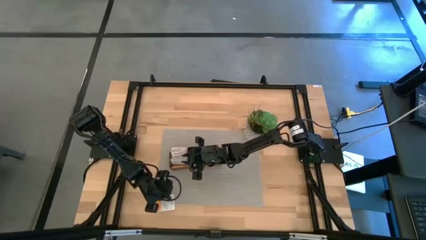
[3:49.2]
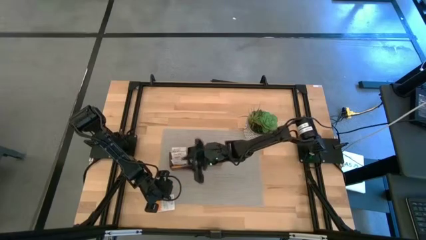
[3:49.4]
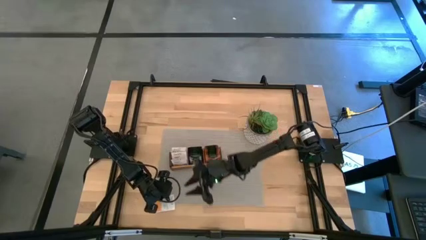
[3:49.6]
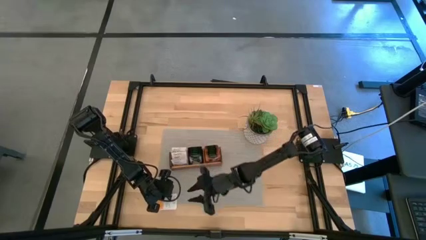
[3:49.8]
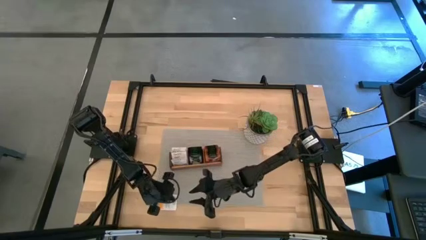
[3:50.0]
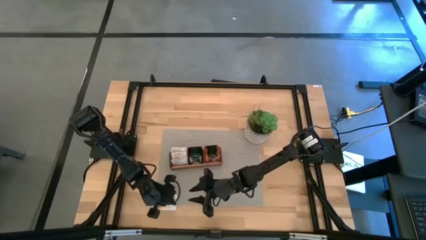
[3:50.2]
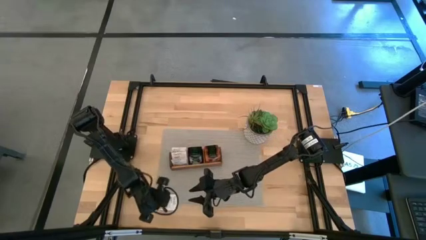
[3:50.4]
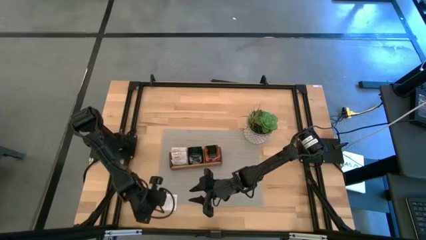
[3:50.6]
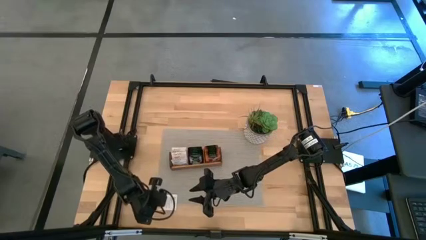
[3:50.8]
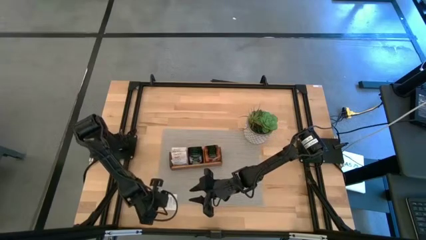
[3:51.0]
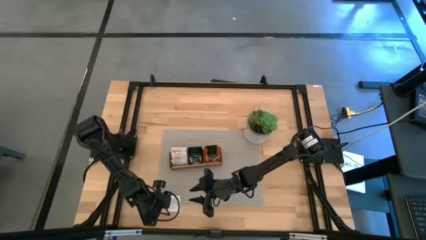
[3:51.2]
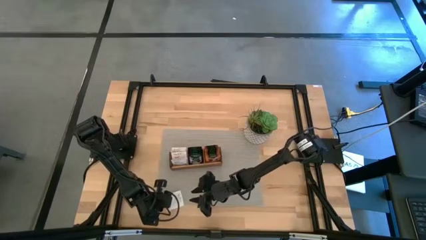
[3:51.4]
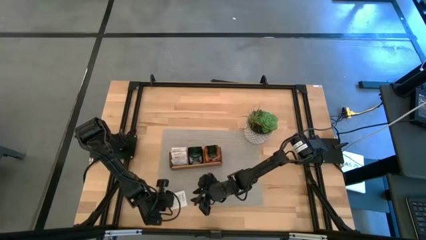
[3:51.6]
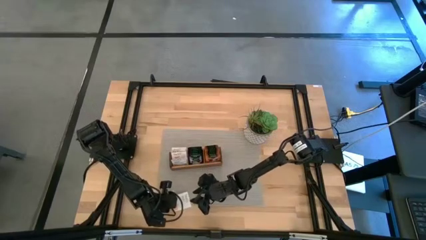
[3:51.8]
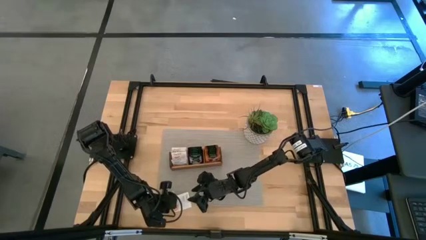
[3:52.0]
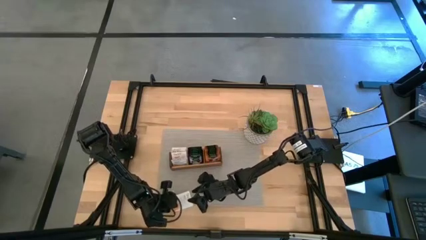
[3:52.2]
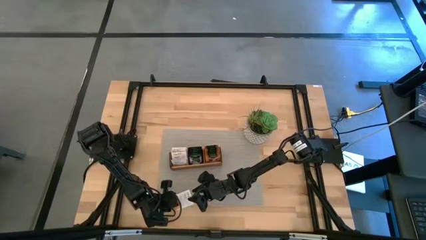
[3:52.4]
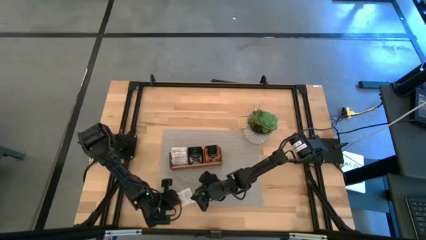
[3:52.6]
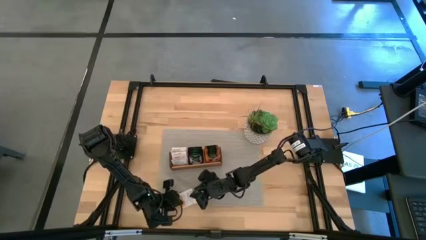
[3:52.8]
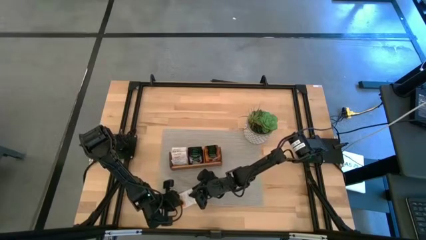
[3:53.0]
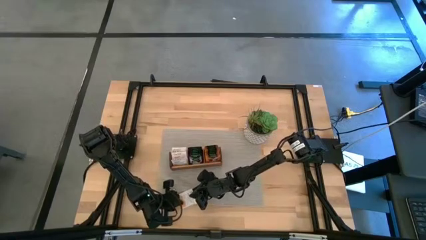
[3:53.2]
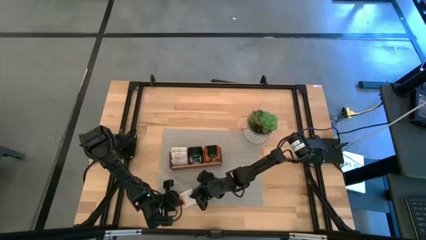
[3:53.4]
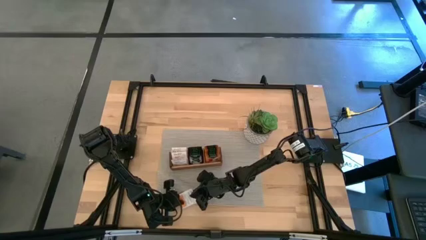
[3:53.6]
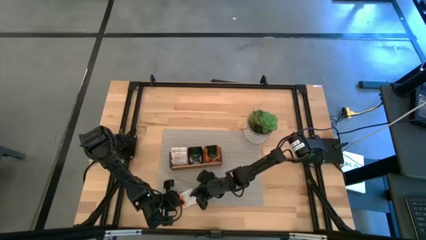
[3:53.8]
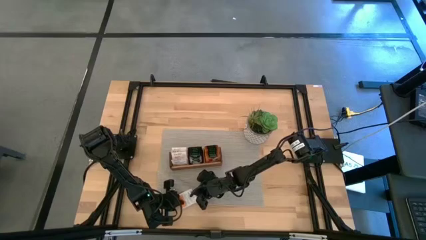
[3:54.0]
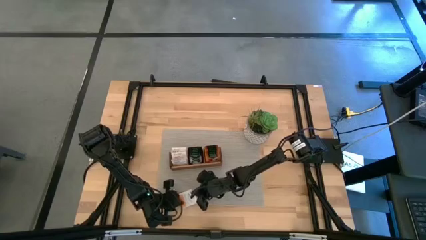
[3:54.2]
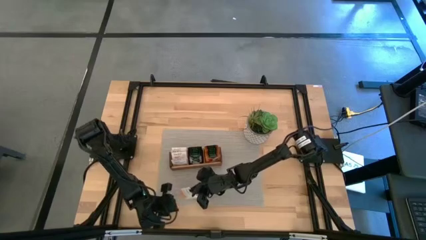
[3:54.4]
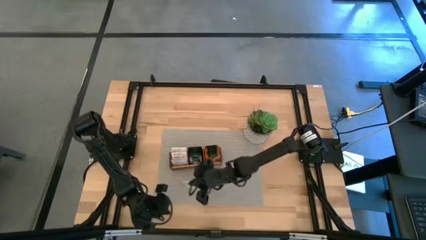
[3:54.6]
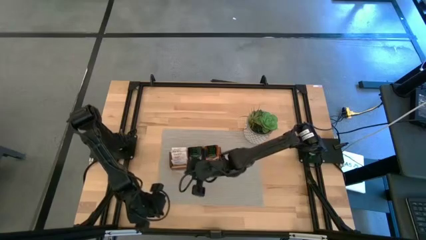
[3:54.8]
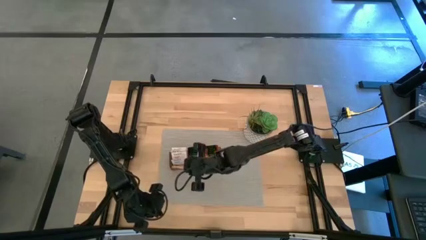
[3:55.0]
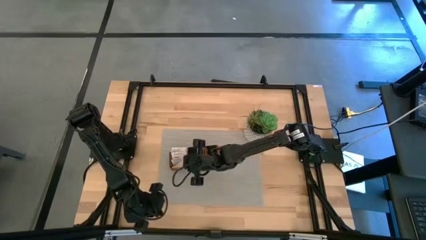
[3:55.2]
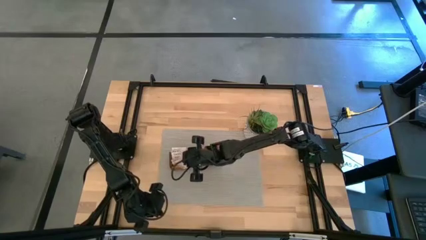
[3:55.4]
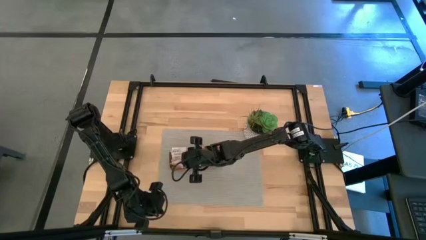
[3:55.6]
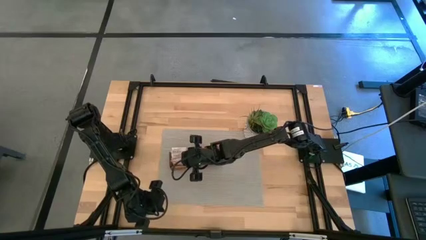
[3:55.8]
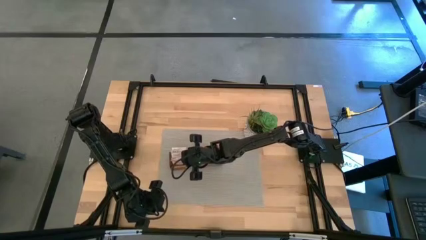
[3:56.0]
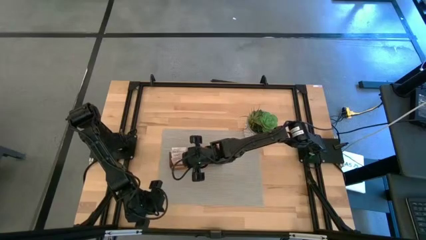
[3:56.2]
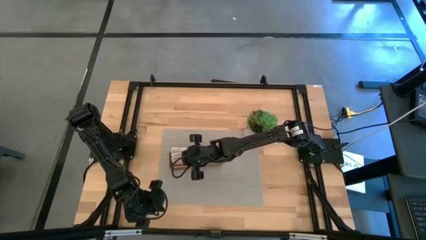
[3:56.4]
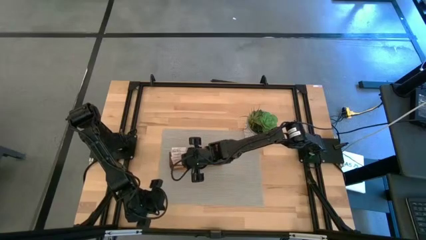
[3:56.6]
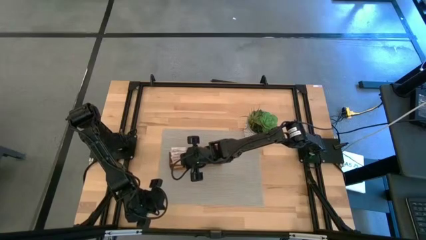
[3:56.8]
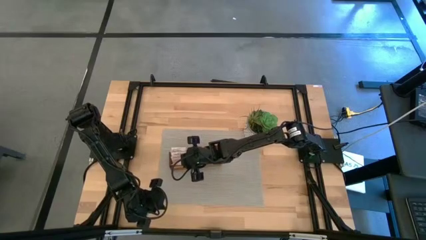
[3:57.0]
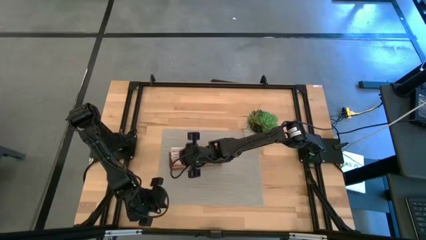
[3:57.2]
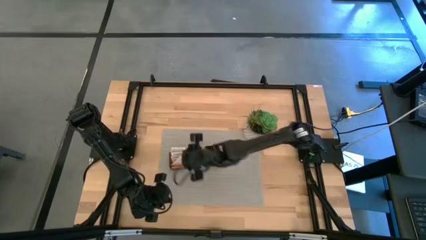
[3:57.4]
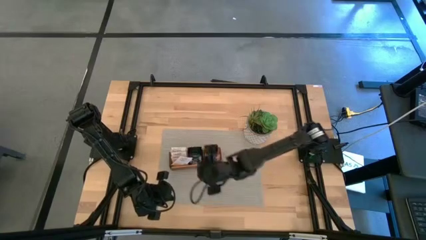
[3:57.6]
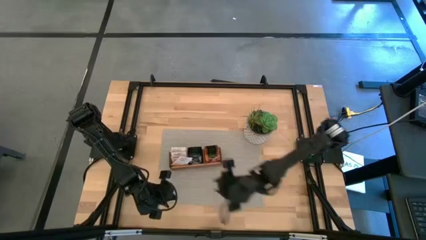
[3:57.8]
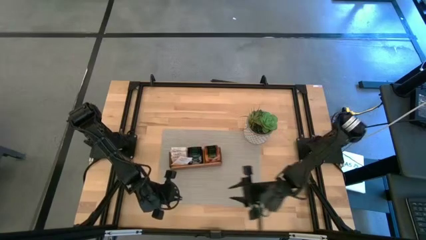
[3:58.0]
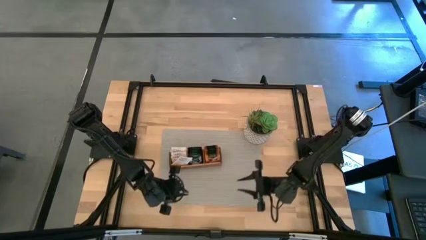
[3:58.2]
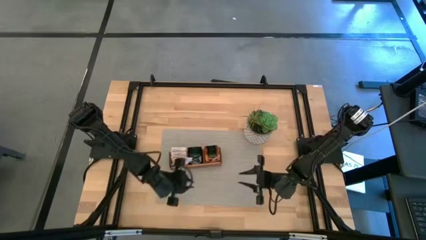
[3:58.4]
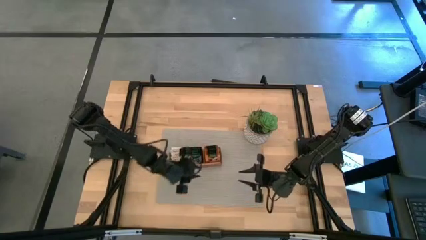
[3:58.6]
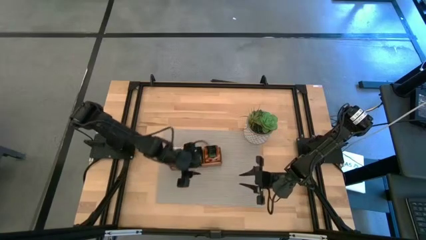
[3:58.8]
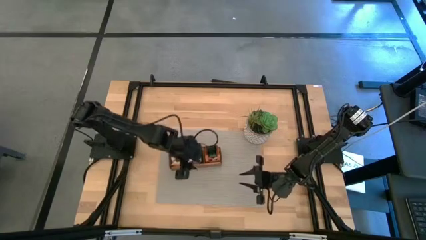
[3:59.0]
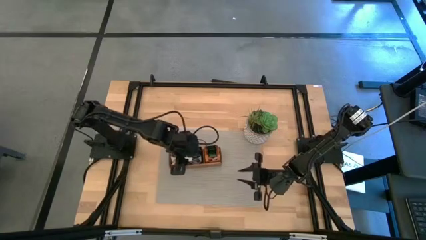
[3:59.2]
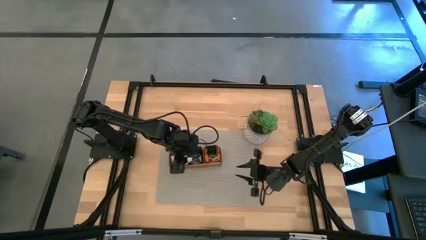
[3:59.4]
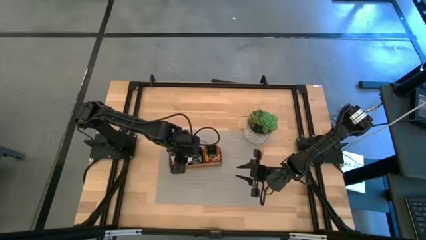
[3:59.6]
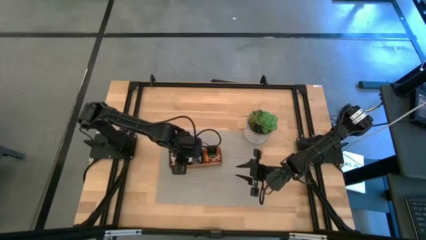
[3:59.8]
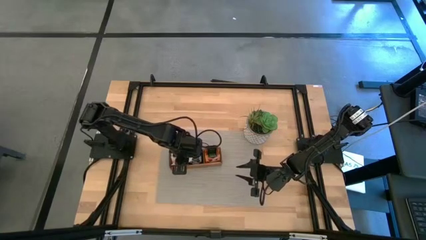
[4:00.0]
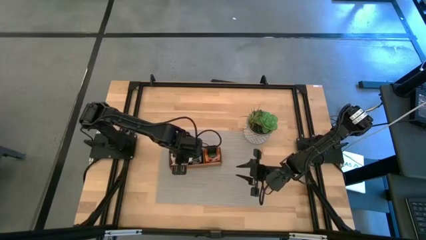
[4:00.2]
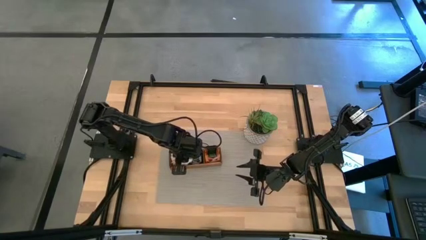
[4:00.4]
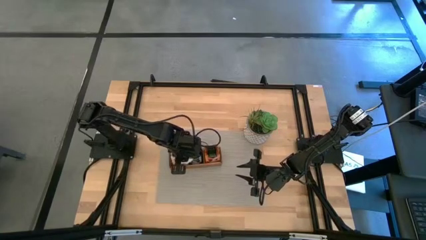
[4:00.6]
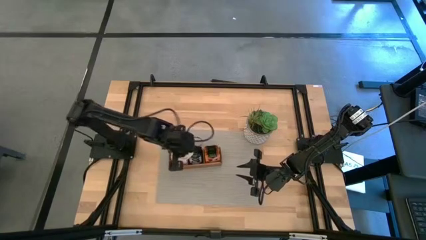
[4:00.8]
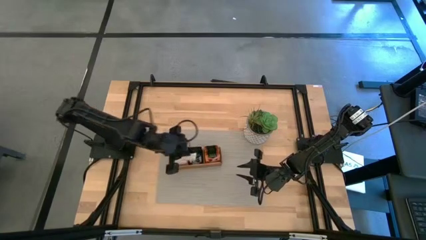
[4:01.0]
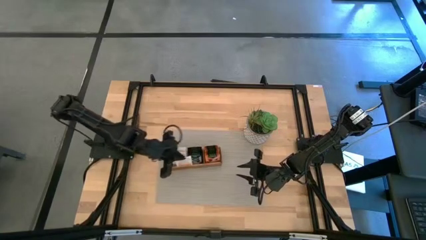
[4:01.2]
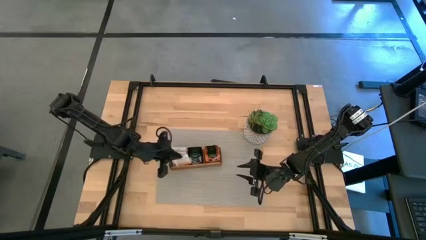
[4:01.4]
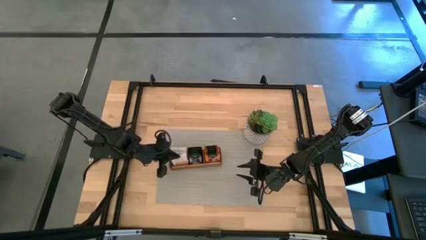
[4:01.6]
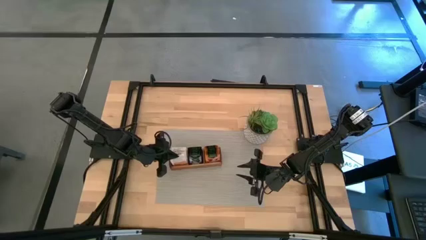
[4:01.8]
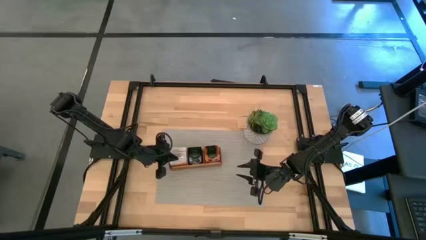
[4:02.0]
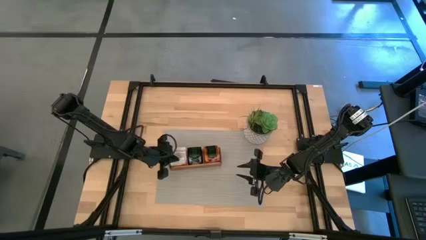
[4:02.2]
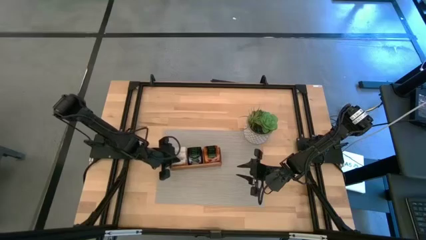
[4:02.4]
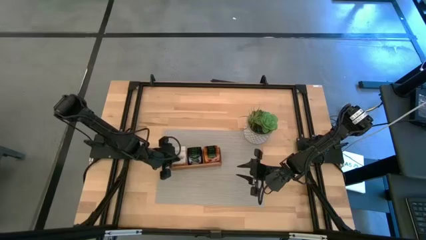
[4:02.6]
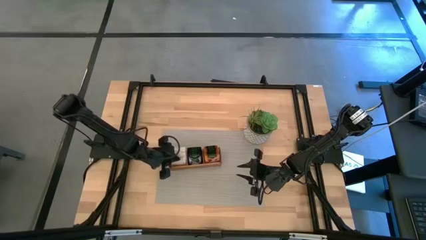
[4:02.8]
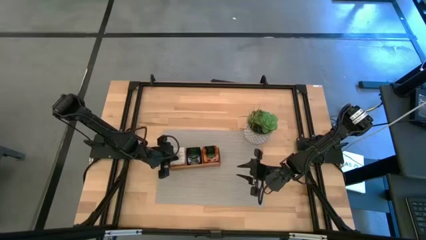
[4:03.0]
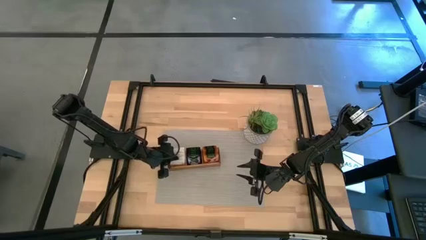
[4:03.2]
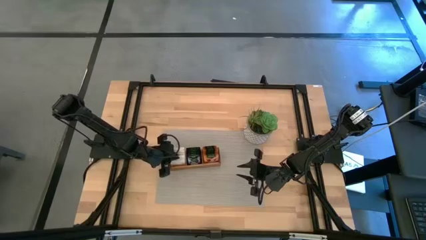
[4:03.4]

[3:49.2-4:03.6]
Task: Pick & Place Tea
Put the white tea bag into the left section of the wooden organizer

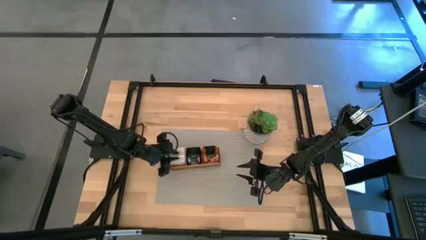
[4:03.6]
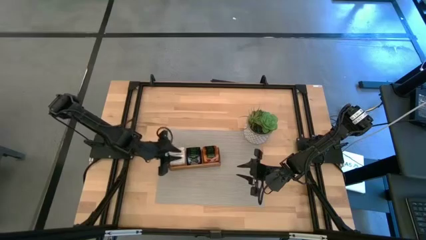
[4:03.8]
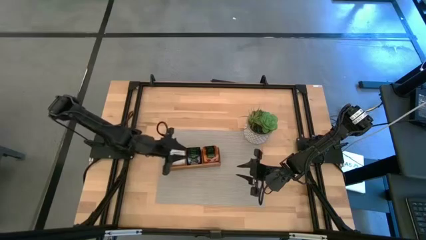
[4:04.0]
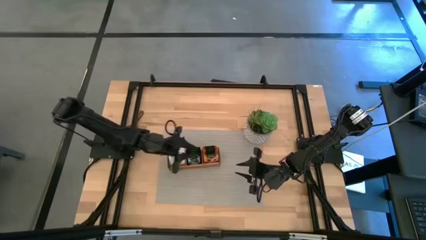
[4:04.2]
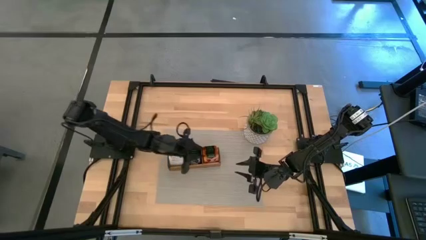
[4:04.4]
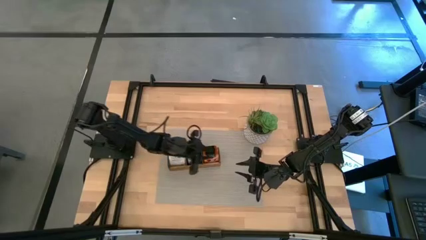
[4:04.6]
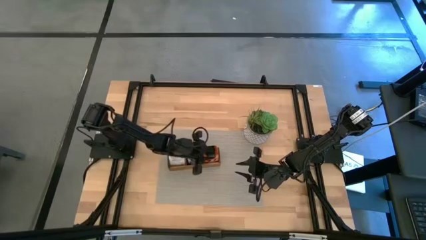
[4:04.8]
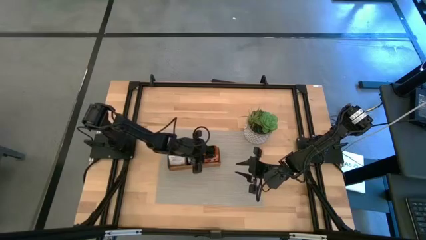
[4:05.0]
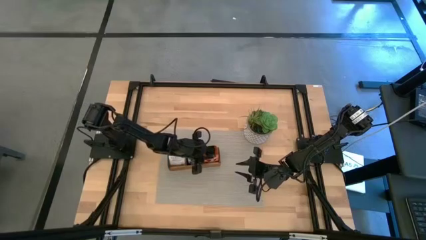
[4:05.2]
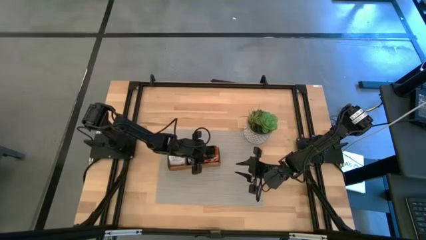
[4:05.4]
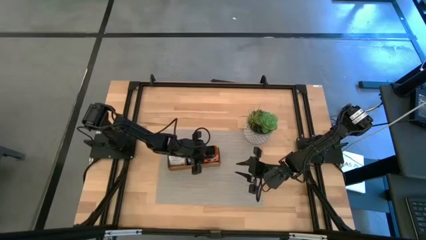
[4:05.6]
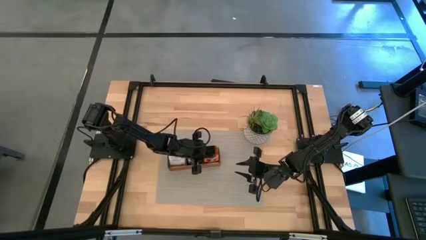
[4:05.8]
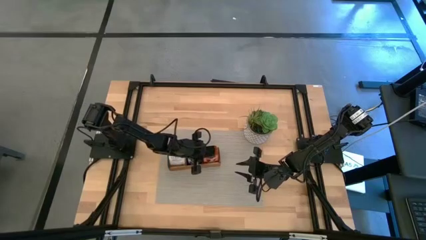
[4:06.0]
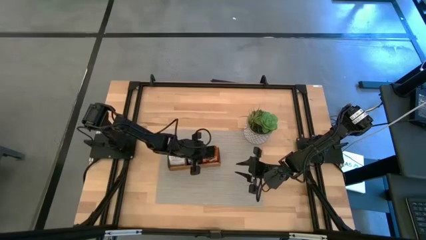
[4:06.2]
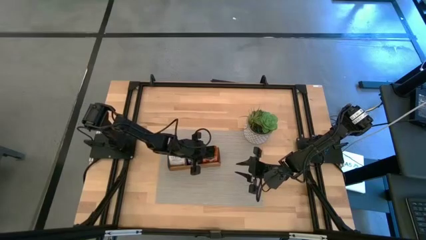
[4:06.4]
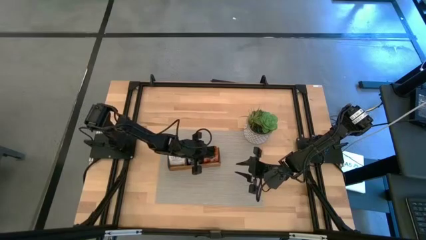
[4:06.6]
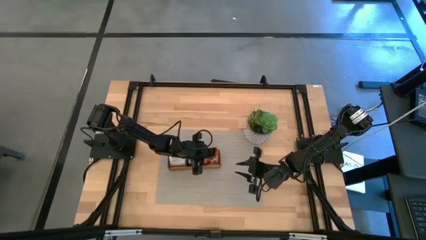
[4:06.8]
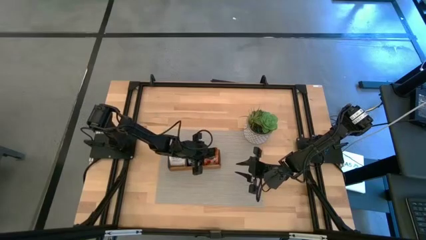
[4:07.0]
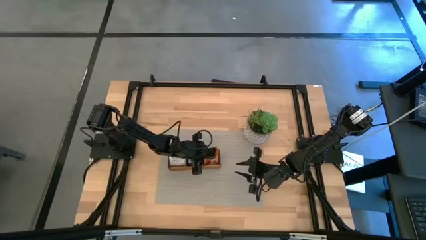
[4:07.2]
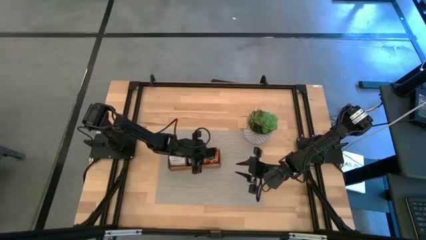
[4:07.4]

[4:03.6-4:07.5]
Adjust the orange tea bag in the right section of the wooden organizer
